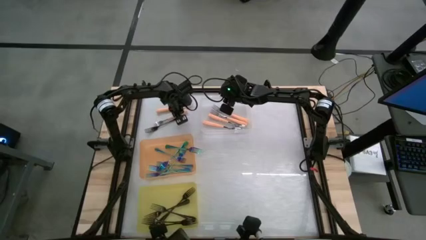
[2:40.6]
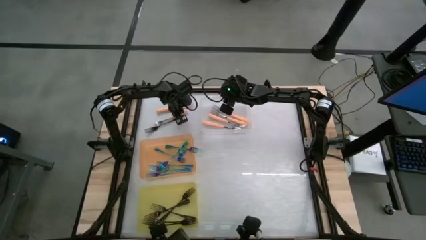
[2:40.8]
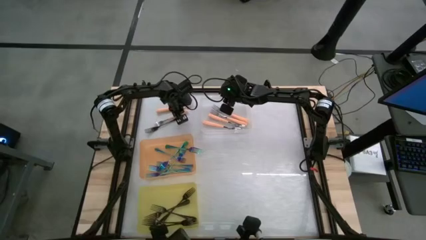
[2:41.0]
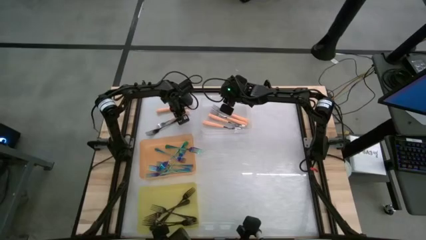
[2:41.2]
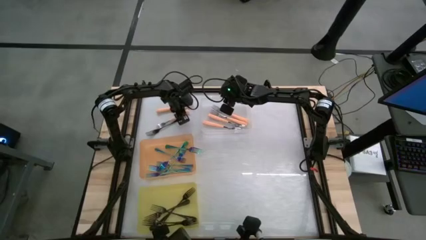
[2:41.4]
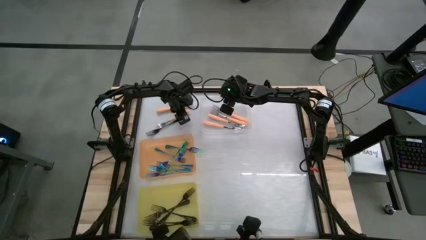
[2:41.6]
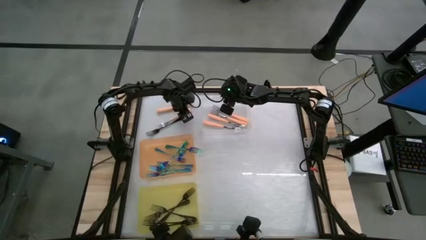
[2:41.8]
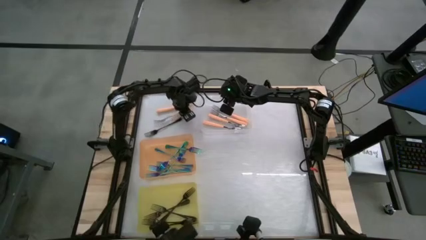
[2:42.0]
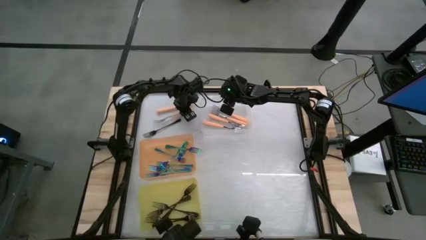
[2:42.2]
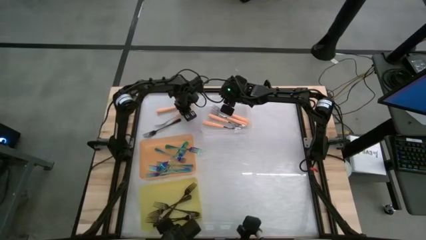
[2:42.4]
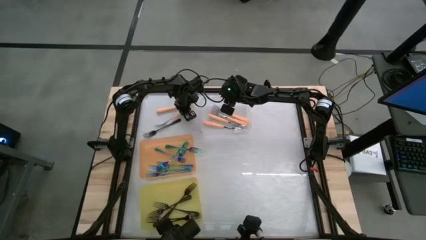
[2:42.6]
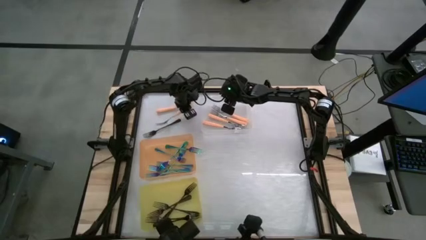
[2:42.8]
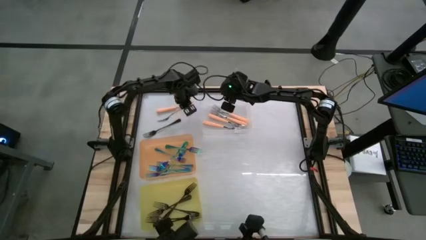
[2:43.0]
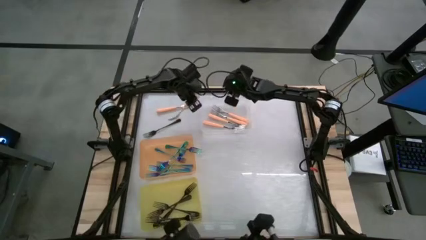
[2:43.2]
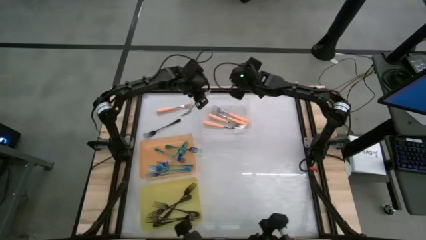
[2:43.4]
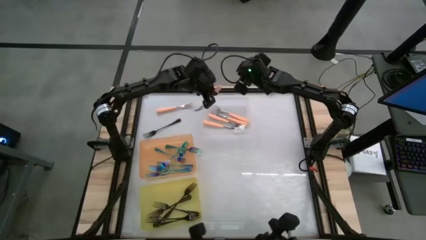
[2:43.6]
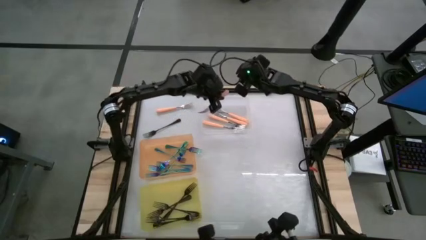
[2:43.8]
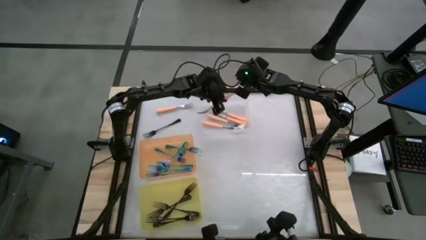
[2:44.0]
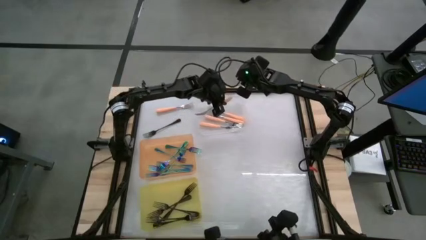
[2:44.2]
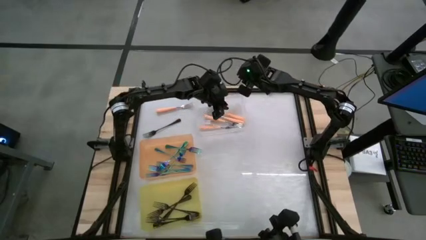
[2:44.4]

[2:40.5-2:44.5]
Task: Sort silverware by color (type)
Put the orange fork into the transparent bin

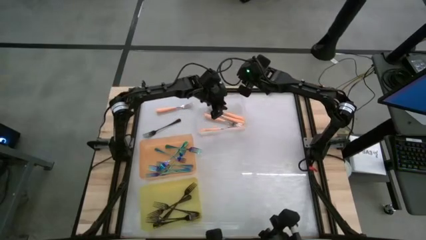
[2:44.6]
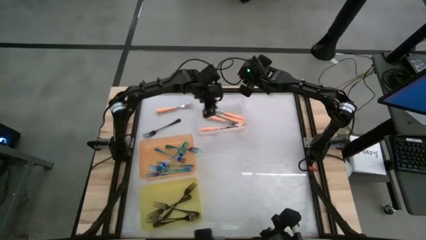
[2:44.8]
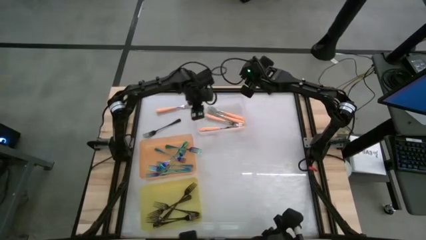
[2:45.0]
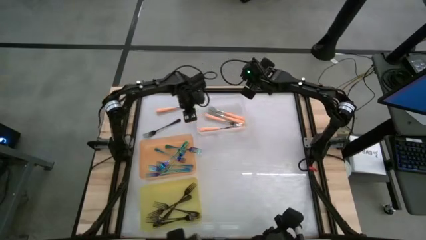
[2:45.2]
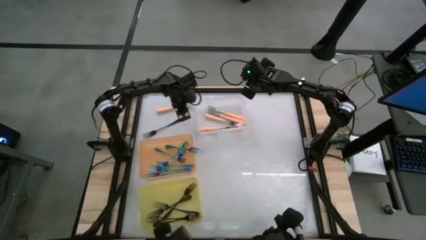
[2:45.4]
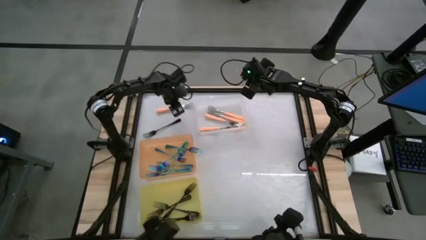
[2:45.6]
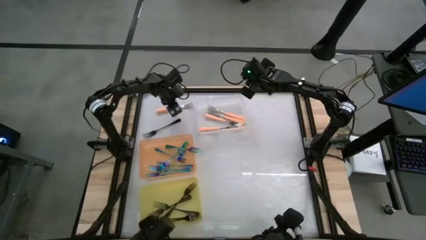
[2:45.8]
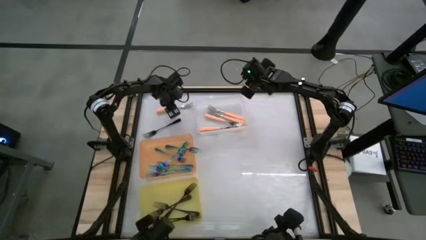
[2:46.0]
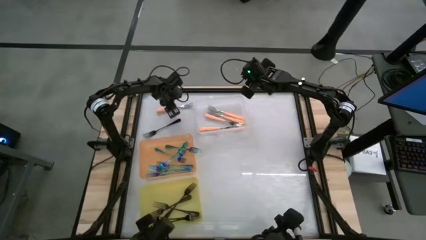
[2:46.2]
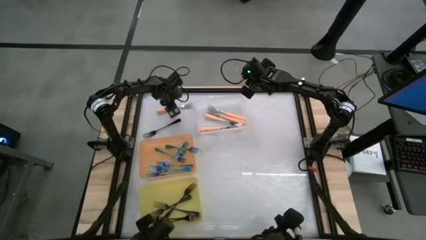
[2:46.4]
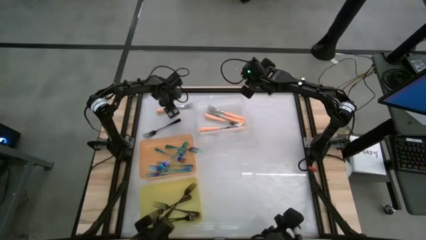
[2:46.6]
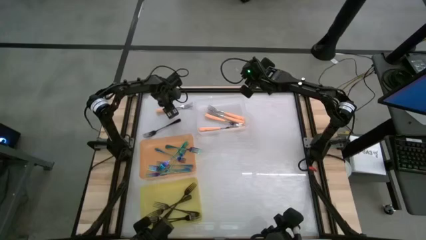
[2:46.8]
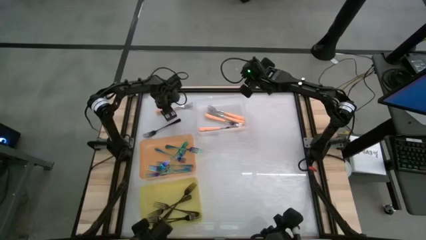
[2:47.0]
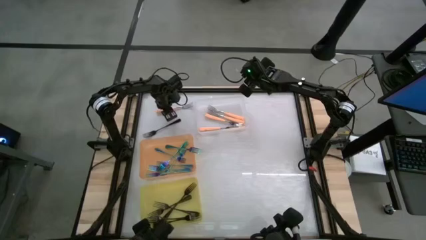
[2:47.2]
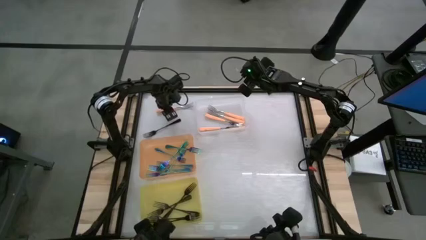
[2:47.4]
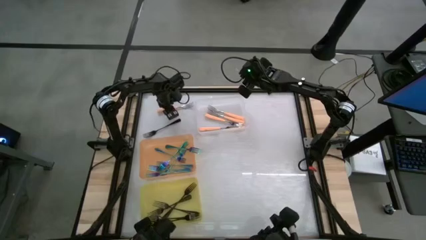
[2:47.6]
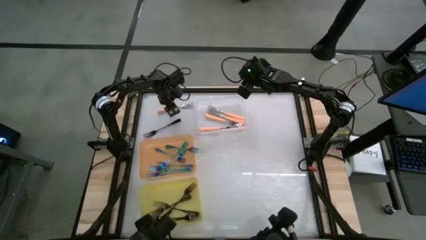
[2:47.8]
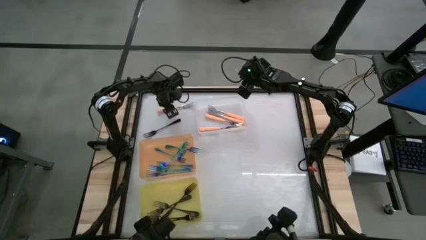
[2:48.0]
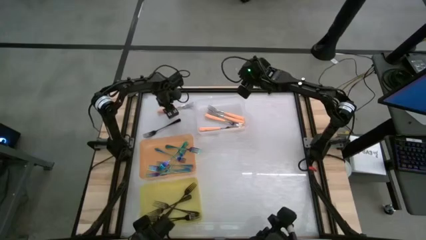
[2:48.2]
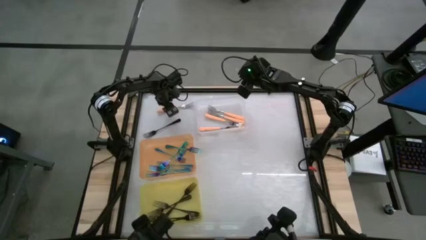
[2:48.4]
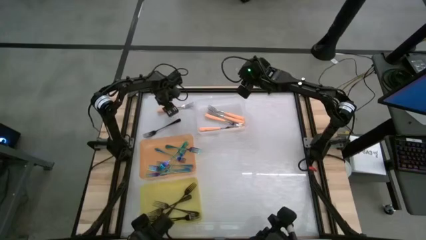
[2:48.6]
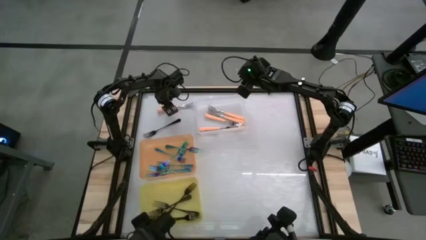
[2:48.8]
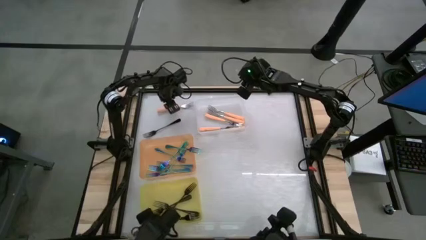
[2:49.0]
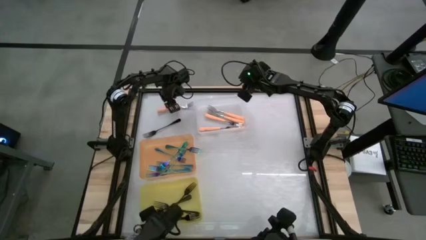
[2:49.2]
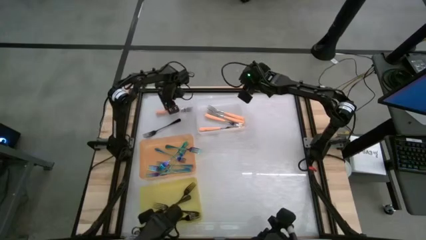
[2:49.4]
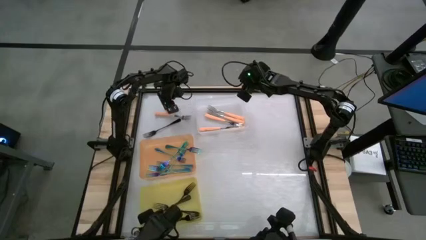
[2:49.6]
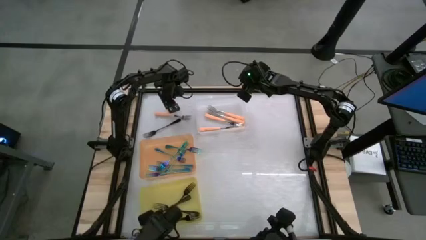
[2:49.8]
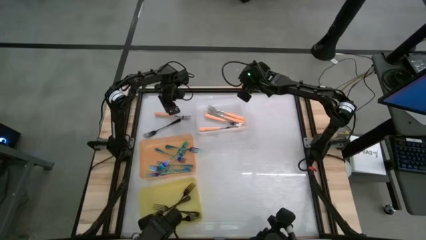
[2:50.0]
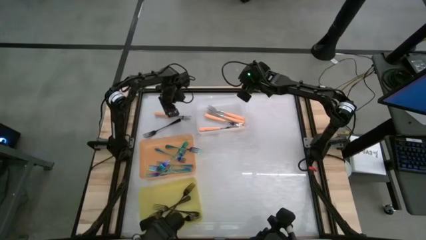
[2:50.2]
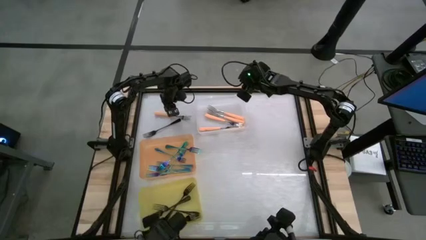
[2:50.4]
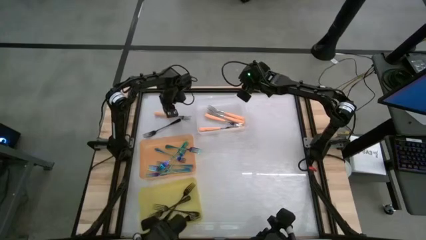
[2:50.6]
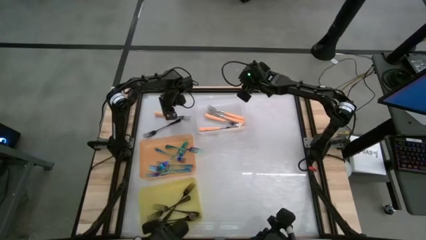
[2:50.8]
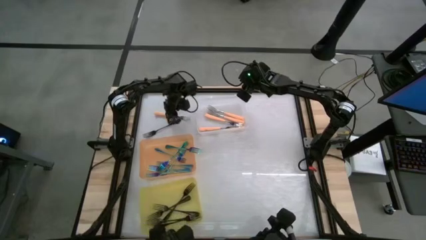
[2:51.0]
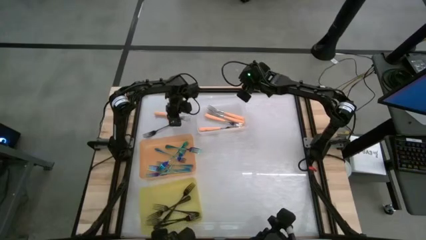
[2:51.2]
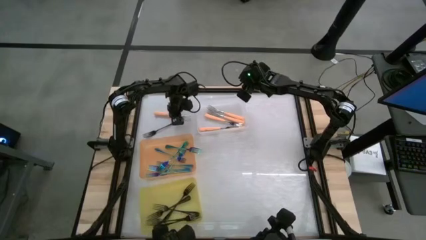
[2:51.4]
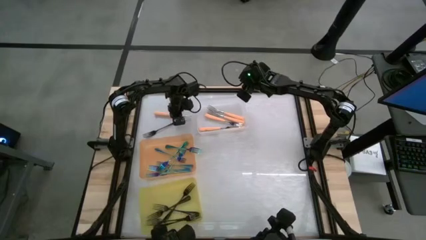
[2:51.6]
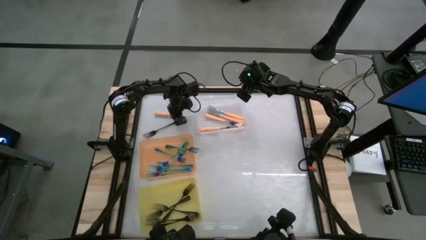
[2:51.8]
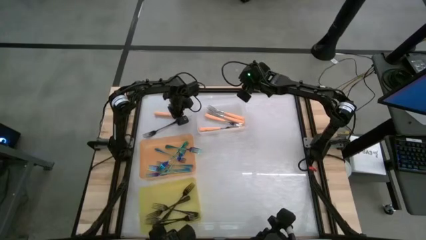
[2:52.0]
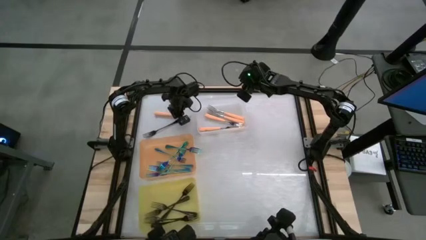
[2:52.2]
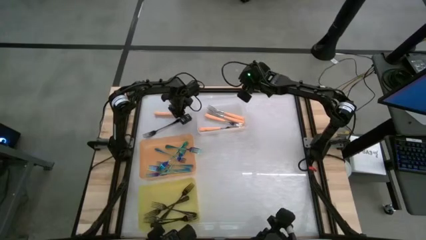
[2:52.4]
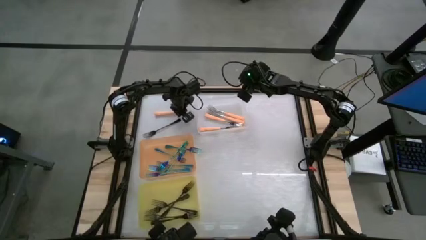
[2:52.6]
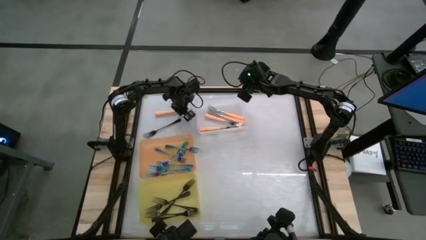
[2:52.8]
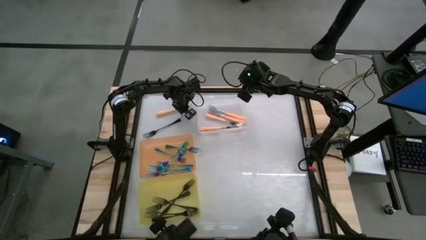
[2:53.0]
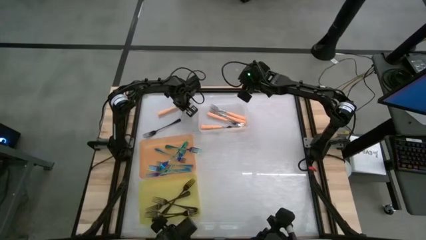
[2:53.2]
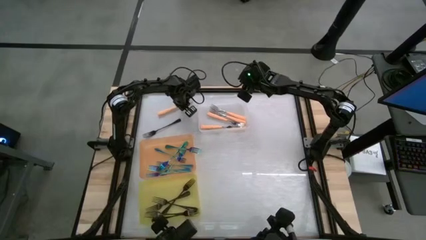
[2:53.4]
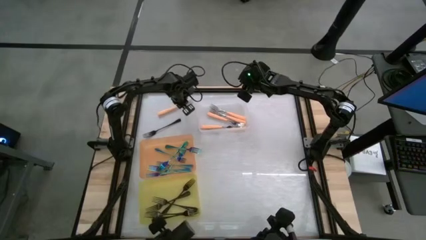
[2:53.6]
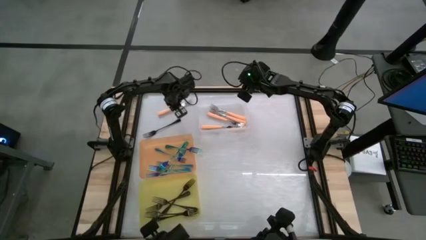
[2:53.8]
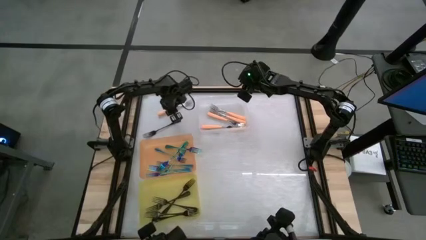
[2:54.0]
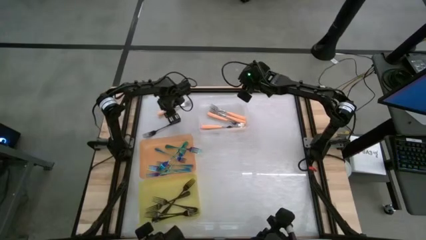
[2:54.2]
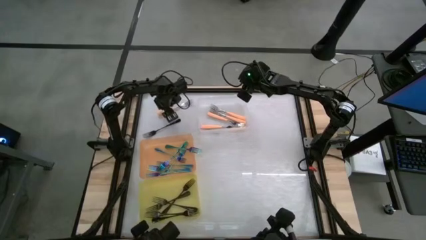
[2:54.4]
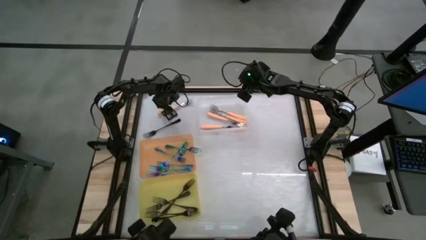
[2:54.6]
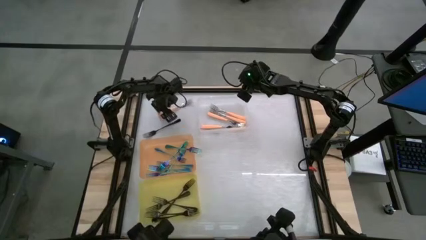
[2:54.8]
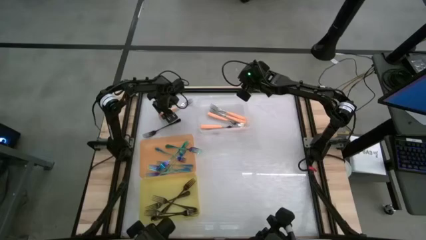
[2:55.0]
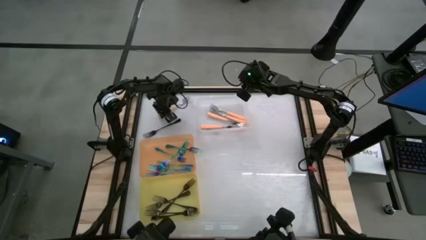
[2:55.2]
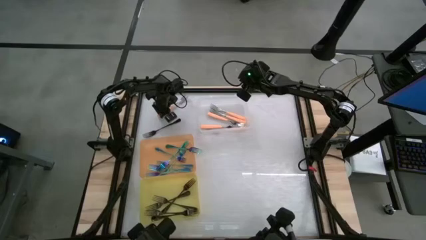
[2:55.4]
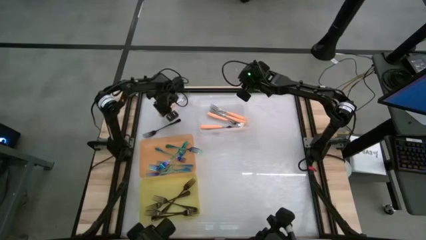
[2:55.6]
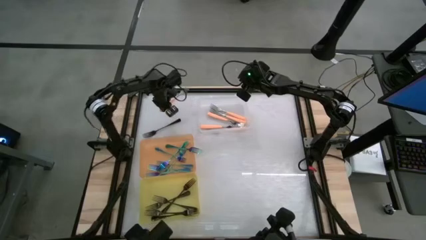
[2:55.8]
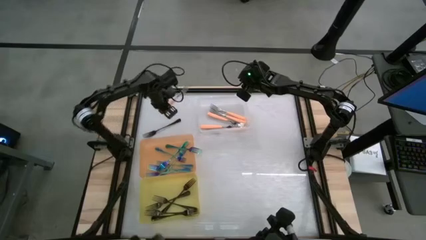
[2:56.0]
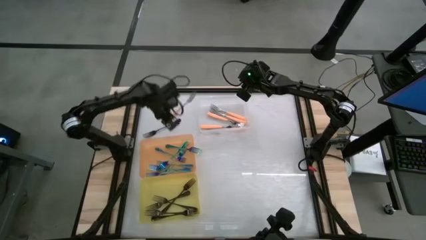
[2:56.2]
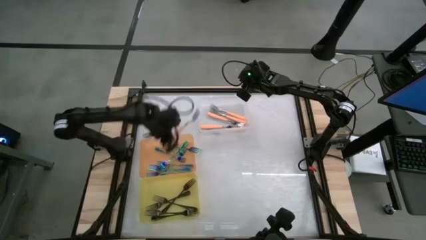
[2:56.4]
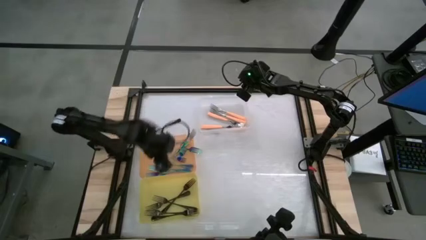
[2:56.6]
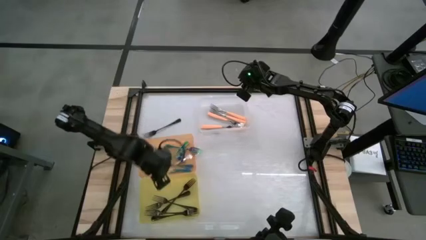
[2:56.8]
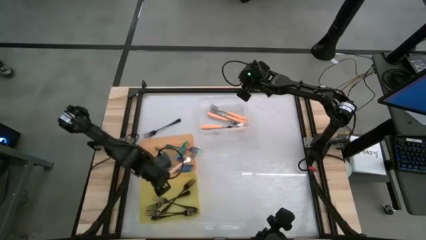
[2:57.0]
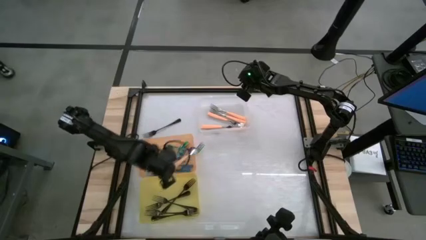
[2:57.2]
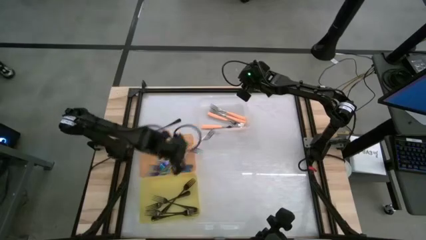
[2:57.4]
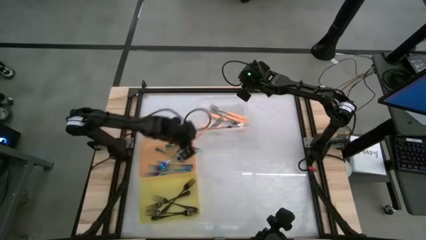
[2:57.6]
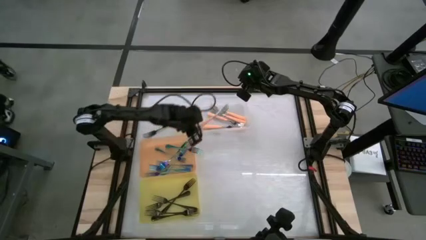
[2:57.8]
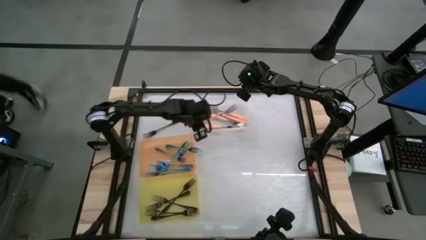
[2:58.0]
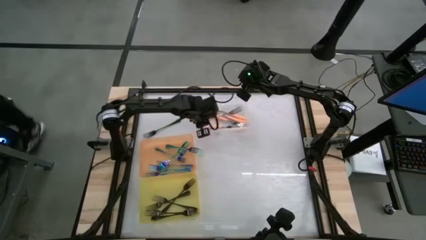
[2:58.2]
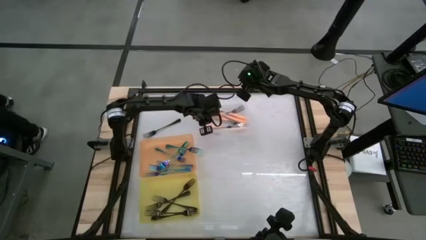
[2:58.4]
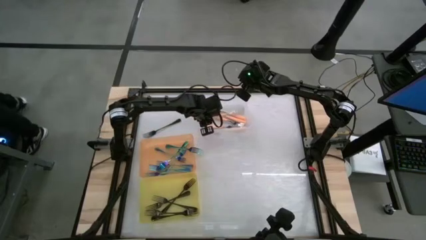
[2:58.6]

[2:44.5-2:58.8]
Put the orange fork into the transparent bin
